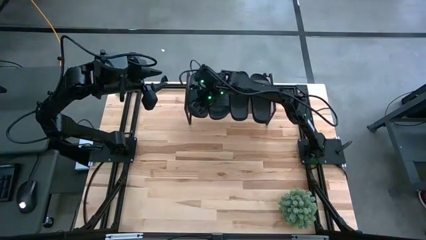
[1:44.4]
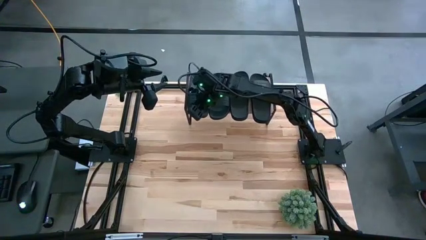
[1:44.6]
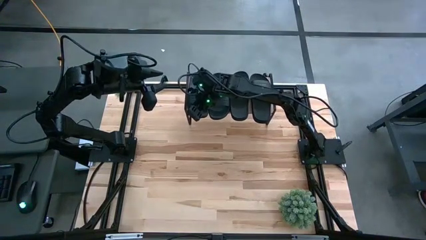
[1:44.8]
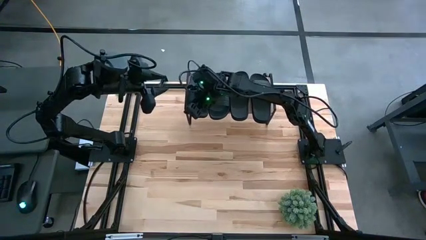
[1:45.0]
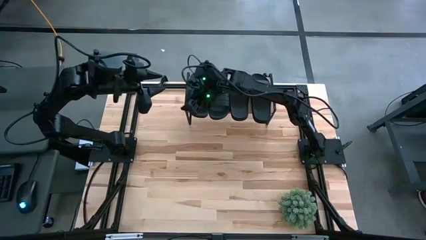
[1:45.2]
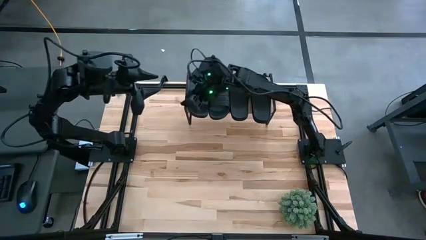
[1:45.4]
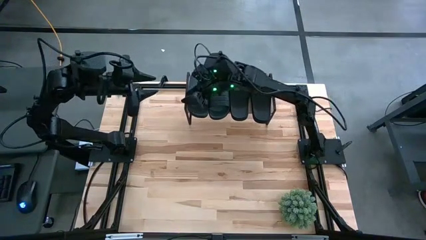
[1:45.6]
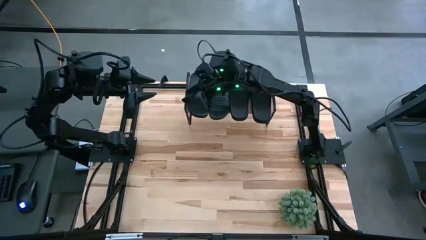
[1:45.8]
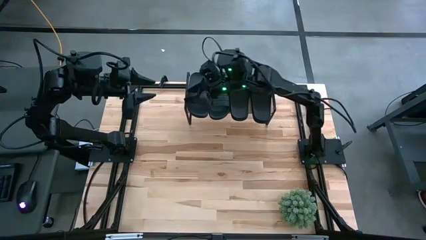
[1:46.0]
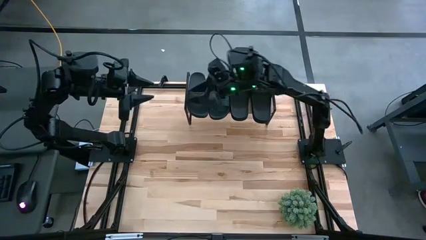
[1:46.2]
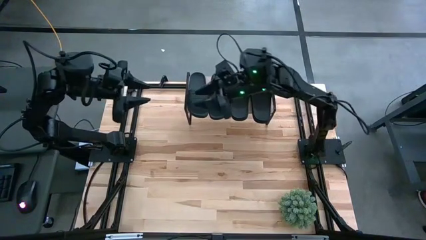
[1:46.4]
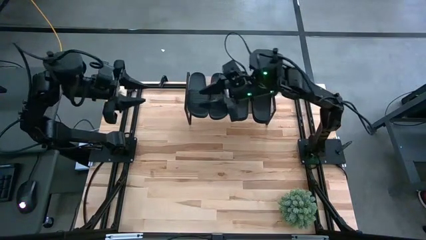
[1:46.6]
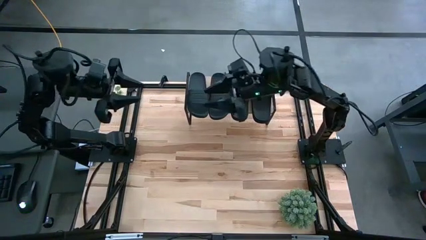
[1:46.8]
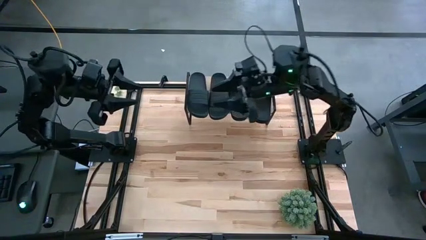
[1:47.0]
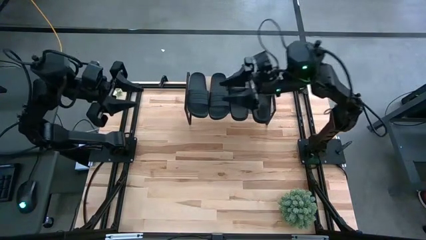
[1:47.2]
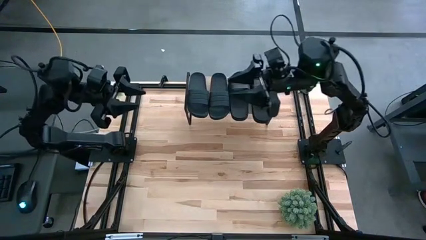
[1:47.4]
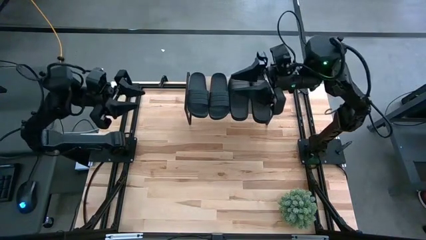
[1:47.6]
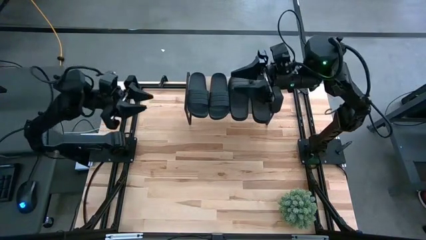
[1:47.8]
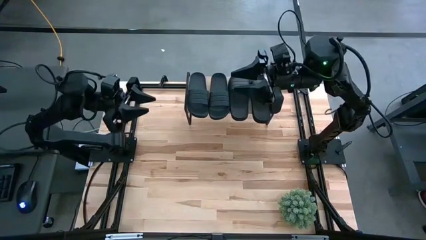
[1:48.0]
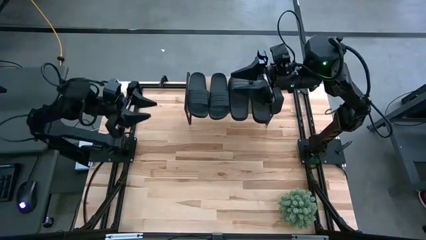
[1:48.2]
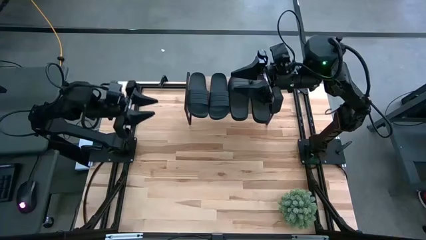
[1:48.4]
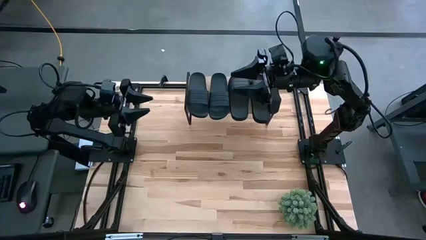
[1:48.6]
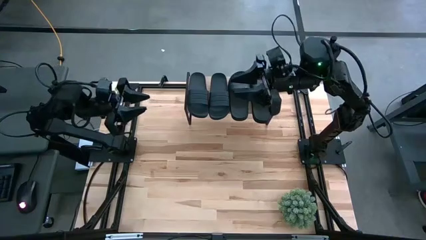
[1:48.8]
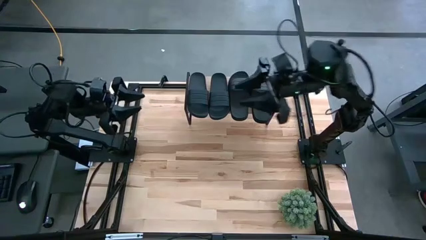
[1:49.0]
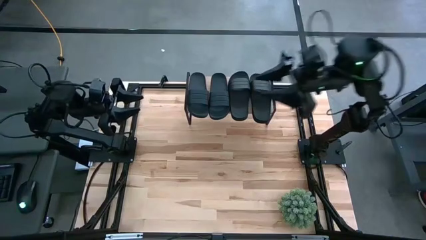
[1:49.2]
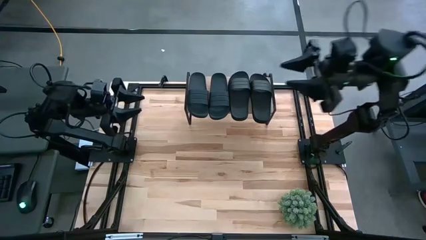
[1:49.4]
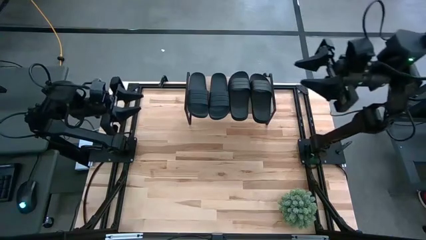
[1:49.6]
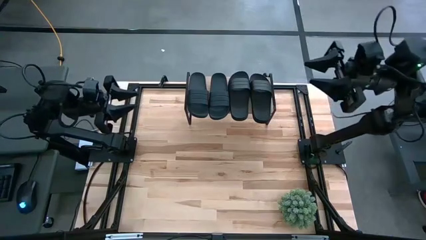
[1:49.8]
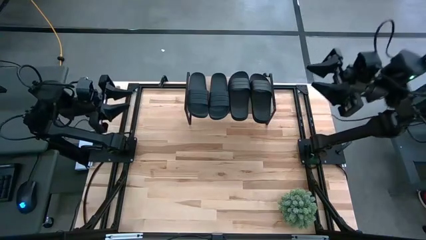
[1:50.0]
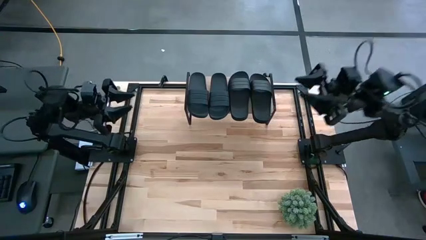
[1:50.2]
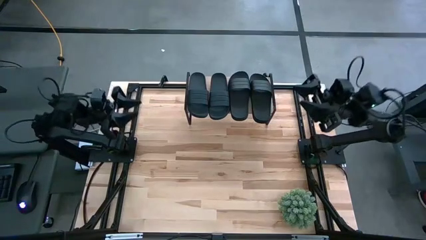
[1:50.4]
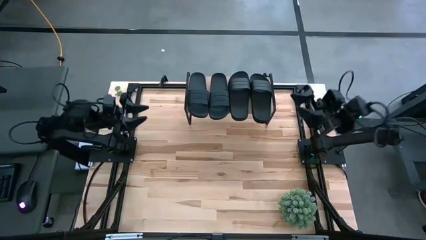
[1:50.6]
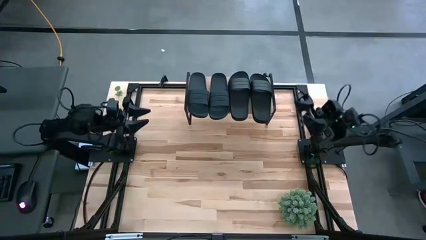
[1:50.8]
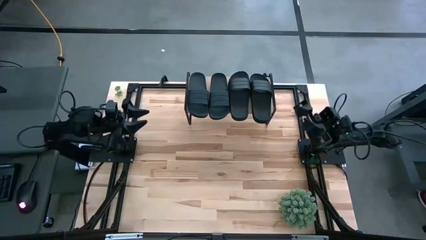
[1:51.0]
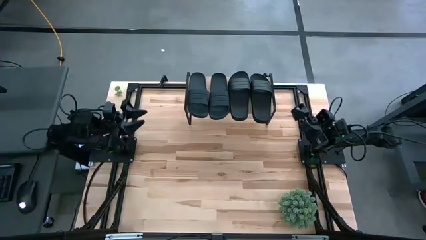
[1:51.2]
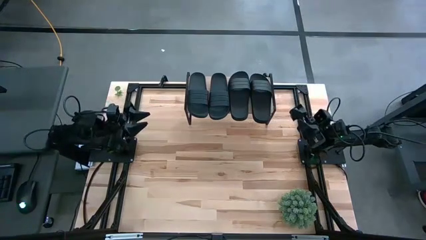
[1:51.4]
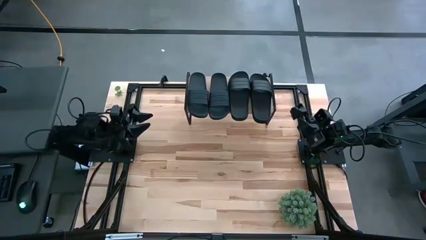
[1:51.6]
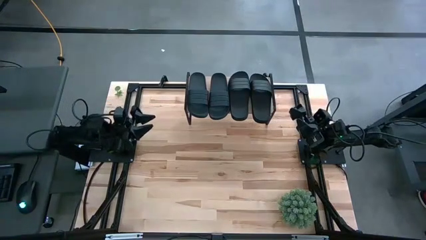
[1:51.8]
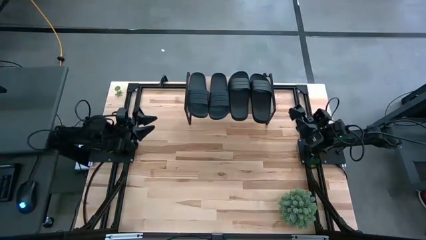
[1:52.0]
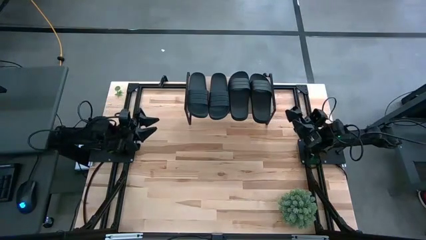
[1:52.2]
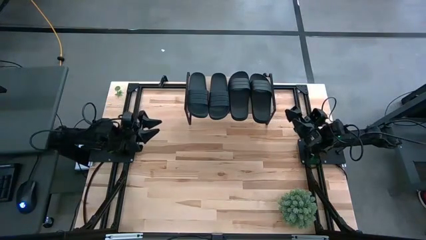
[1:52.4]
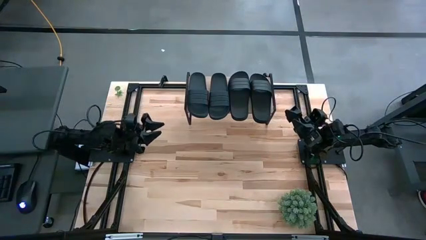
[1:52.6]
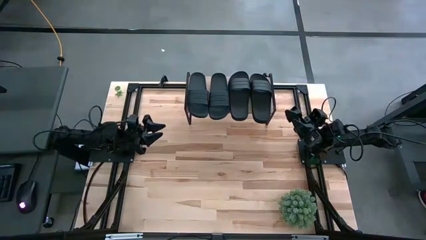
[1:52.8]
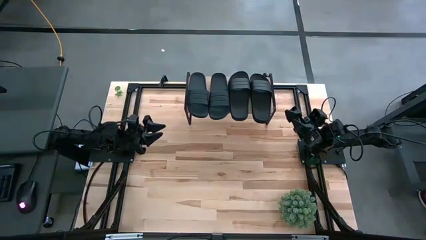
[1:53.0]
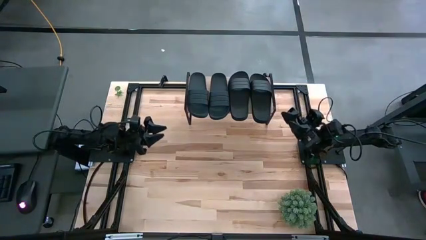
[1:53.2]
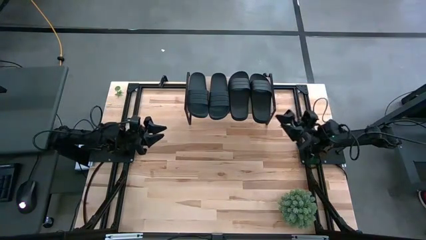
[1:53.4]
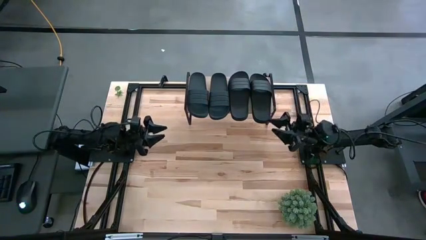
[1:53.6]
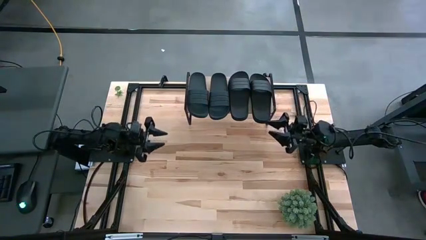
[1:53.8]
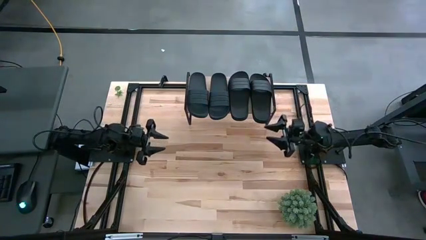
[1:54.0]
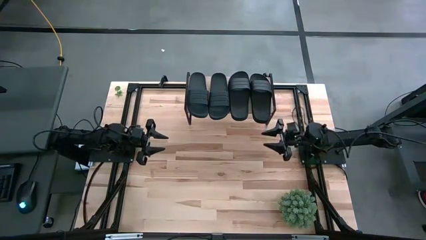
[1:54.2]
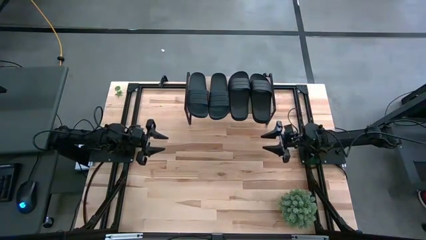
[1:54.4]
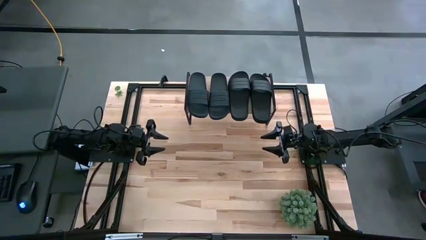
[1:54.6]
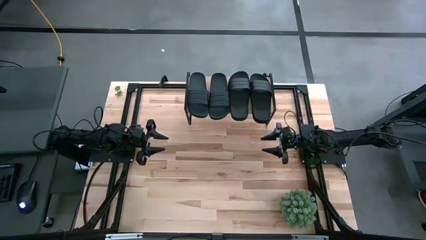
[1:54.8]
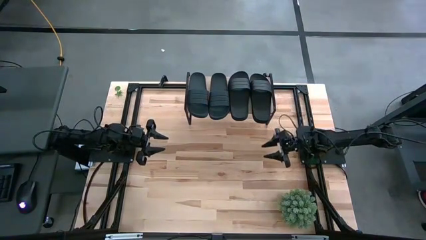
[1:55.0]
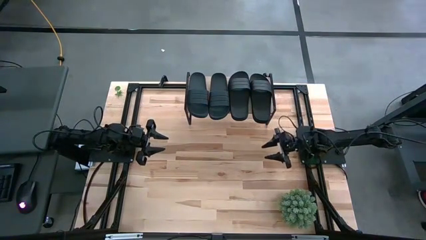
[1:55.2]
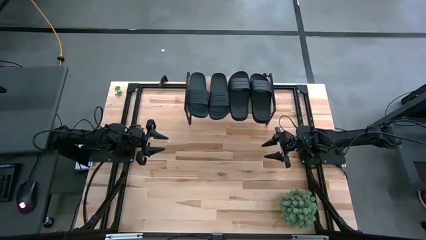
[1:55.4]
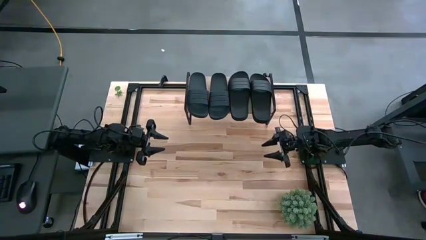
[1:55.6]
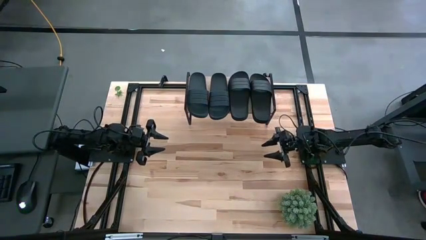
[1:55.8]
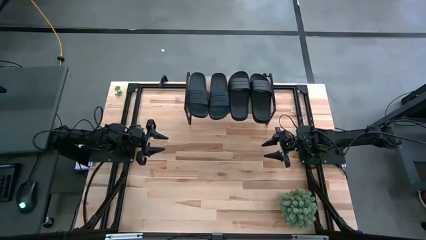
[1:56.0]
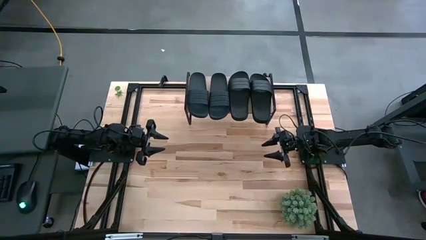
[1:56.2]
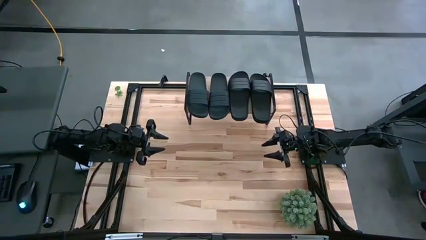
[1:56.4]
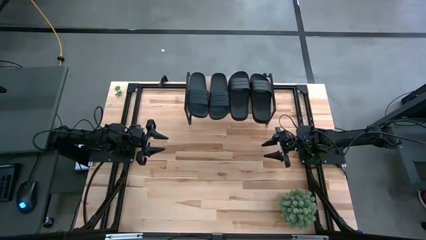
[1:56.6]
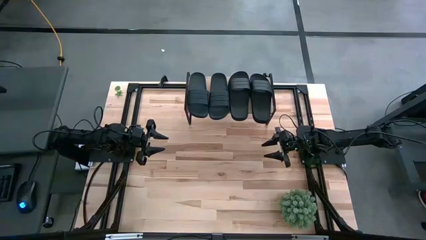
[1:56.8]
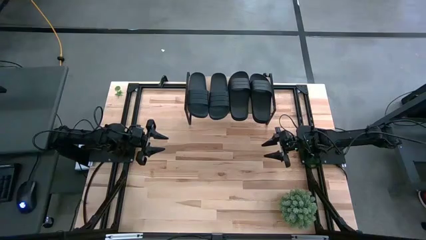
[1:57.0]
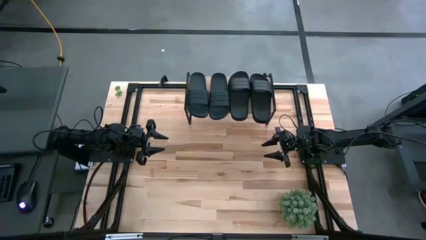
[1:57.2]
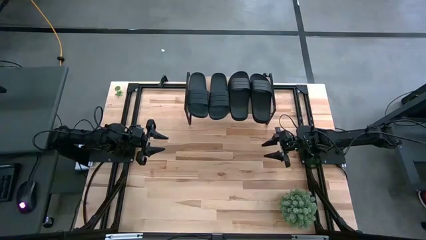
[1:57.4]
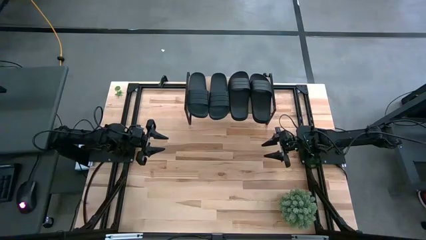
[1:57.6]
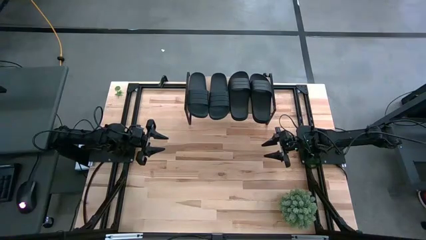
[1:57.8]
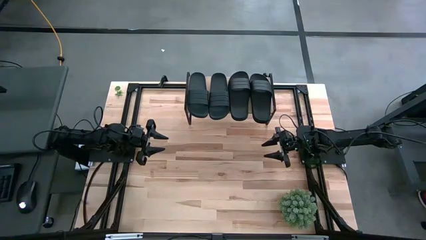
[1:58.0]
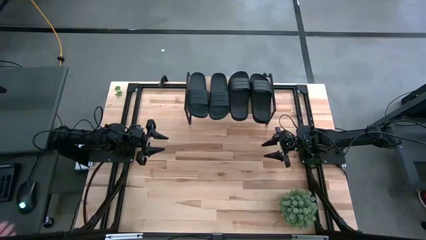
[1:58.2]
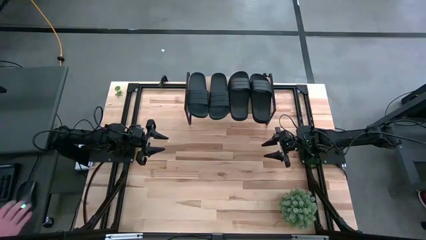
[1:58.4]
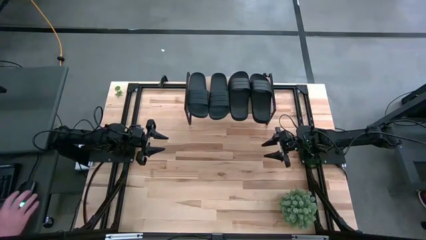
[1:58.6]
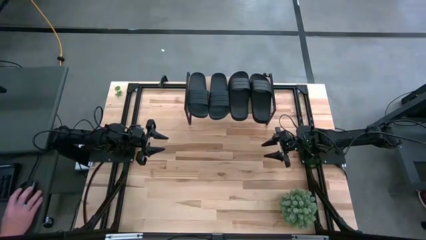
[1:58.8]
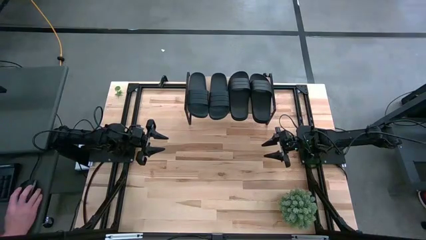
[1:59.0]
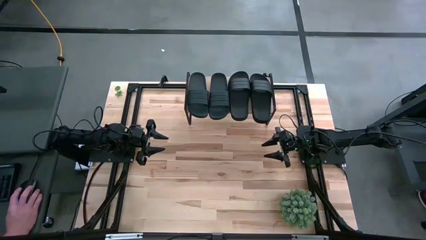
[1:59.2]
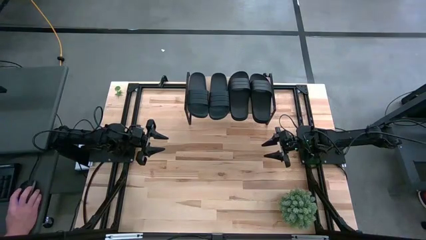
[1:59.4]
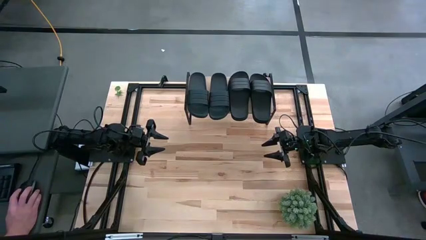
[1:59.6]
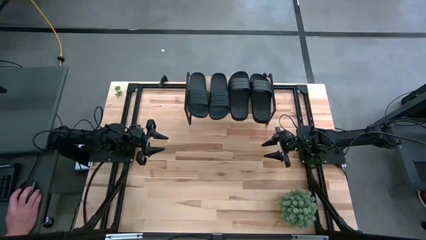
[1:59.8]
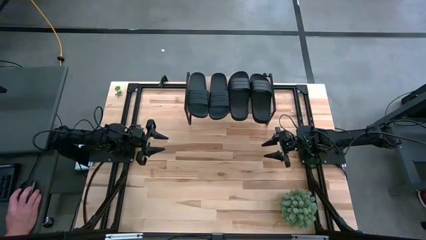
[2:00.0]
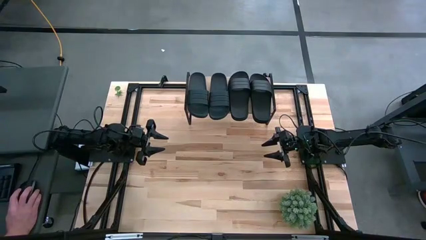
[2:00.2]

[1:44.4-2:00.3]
Task: Pick and place slides into the shelf
Return to Home Position
